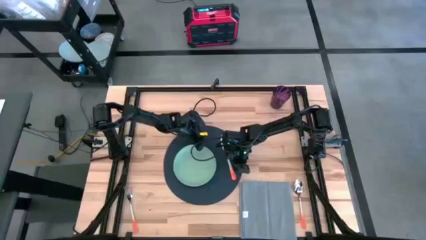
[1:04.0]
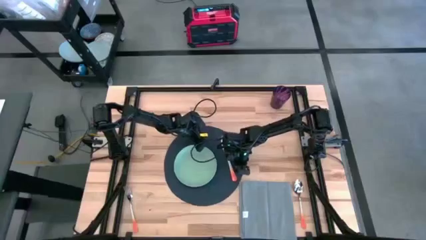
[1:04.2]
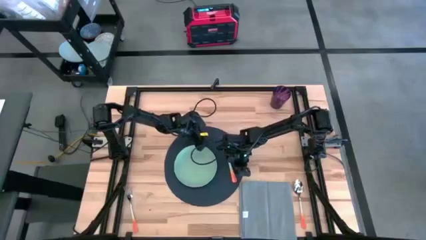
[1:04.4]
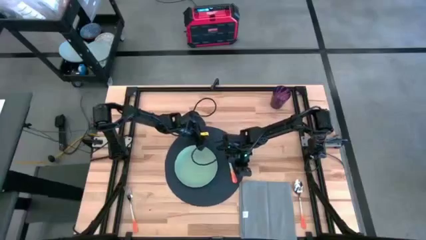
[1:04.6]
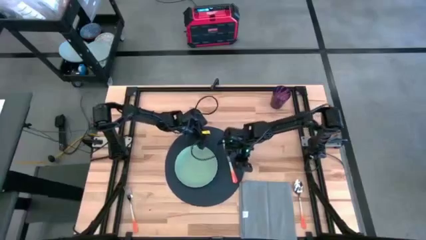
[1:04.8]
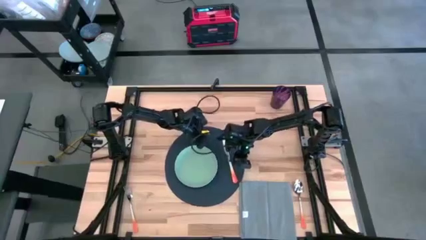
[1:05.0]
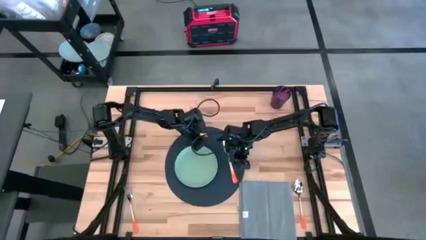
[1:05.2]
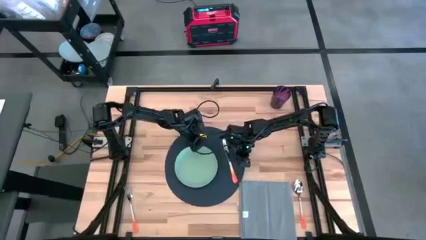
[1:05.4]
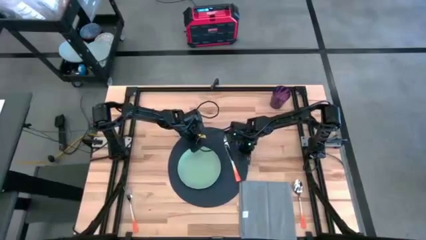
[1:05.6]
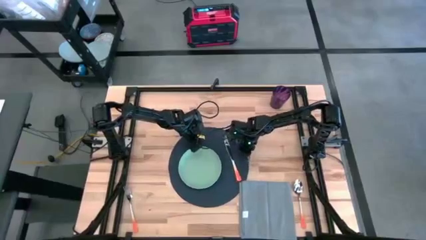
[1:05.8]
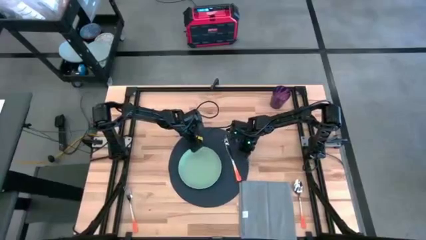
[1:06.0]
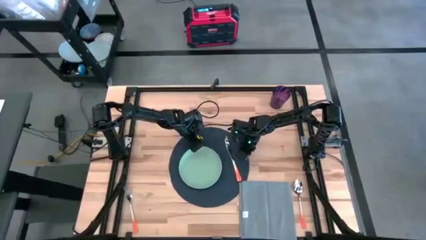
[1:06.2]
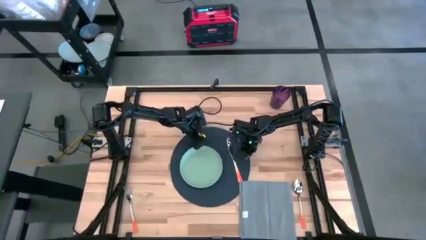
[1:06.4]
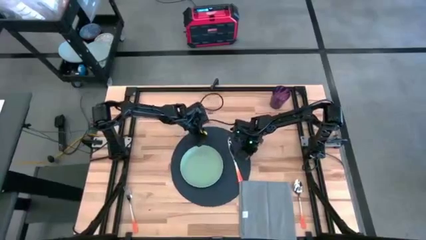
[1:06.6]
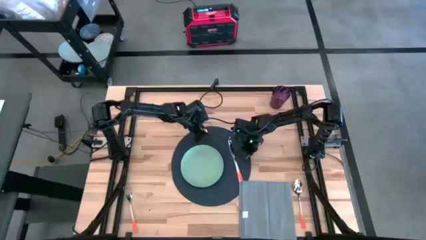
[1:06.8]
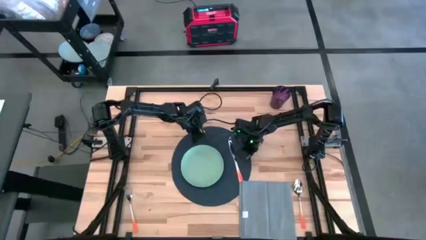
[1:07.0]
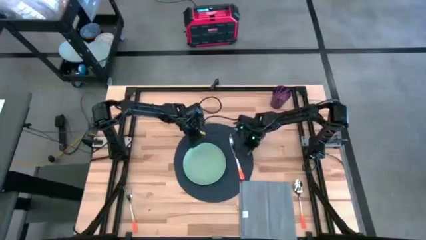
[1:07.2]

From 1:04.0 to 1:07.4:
Task: Set table place
Adjust the blue place mat on the table

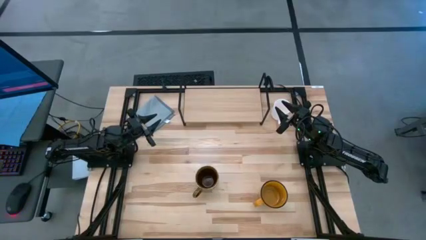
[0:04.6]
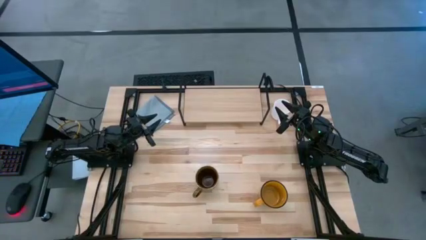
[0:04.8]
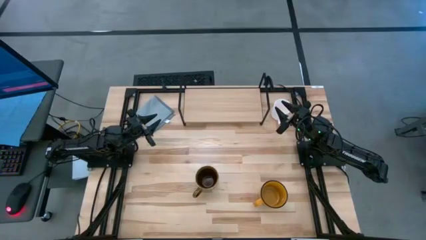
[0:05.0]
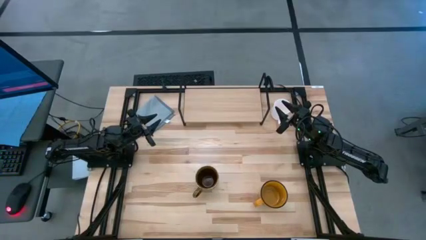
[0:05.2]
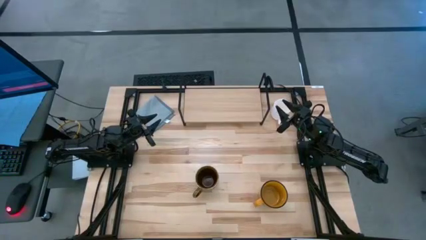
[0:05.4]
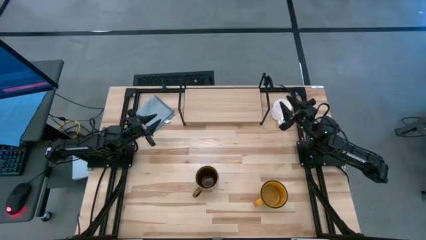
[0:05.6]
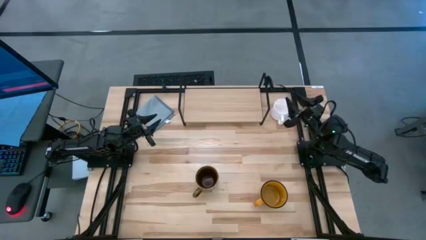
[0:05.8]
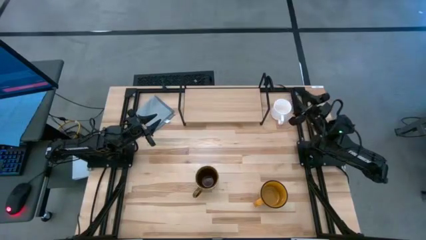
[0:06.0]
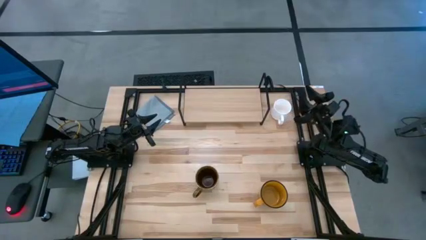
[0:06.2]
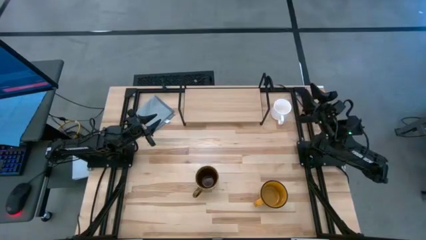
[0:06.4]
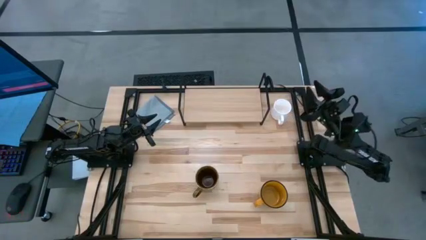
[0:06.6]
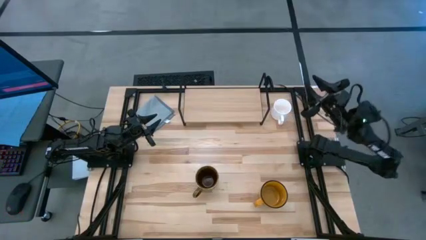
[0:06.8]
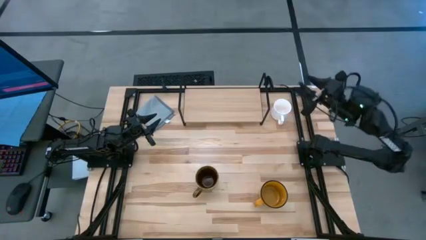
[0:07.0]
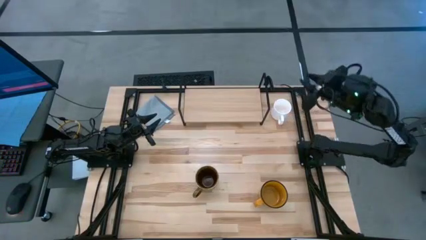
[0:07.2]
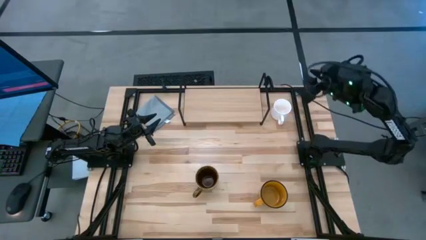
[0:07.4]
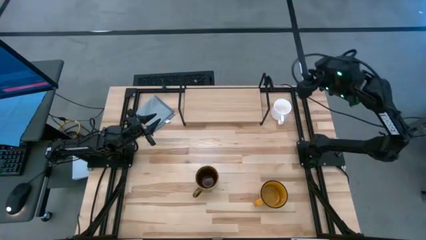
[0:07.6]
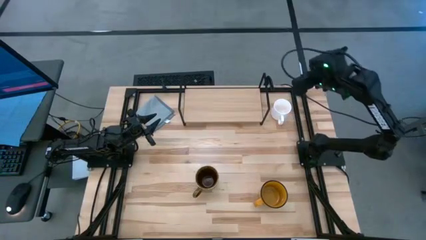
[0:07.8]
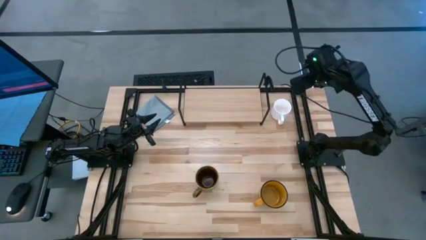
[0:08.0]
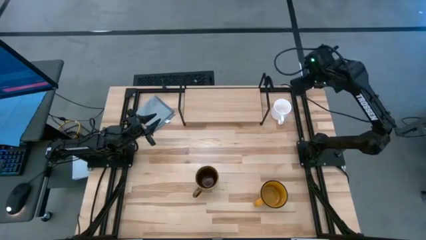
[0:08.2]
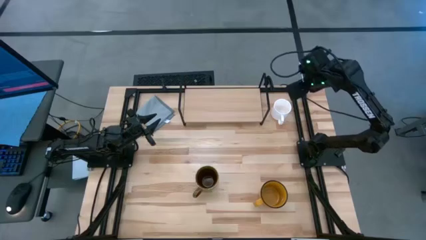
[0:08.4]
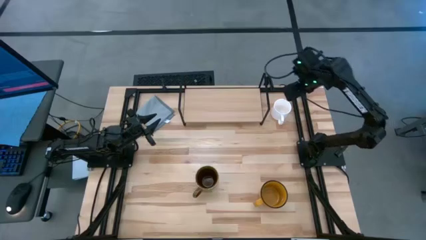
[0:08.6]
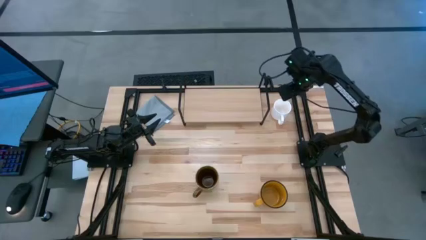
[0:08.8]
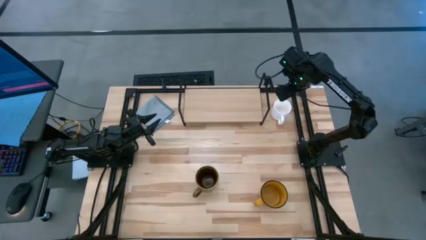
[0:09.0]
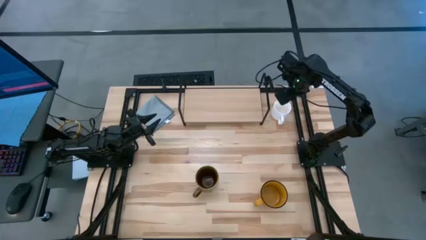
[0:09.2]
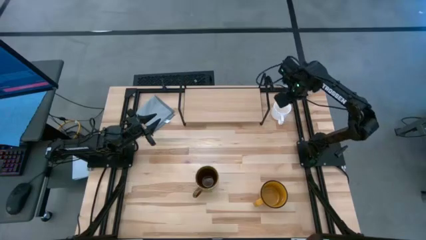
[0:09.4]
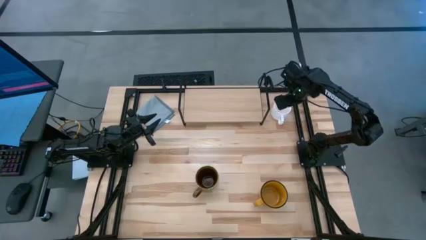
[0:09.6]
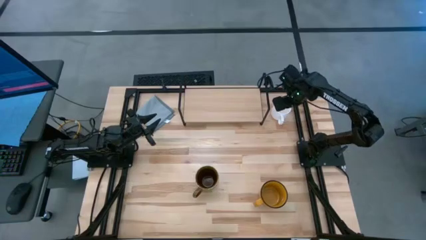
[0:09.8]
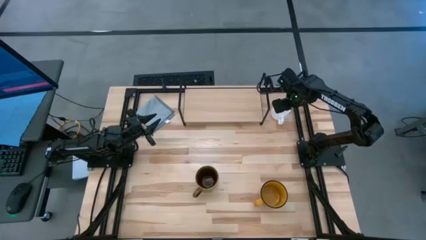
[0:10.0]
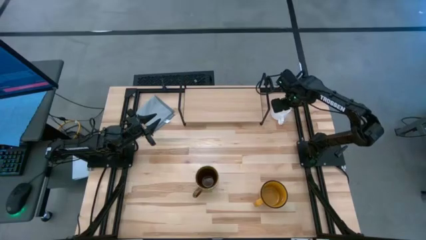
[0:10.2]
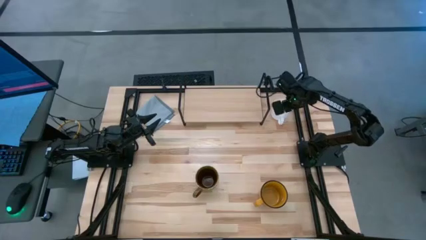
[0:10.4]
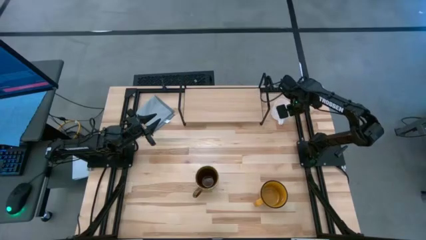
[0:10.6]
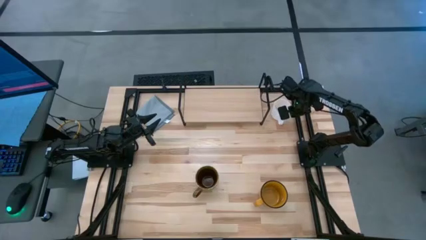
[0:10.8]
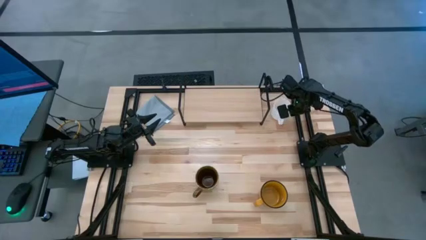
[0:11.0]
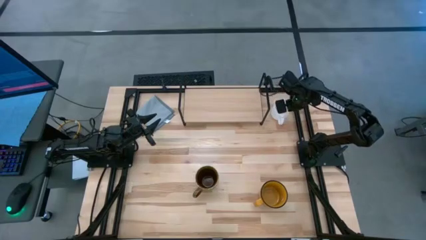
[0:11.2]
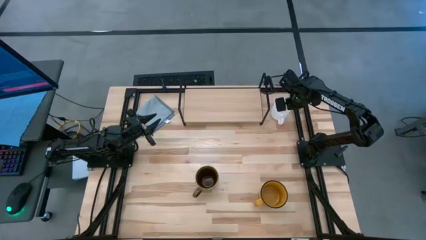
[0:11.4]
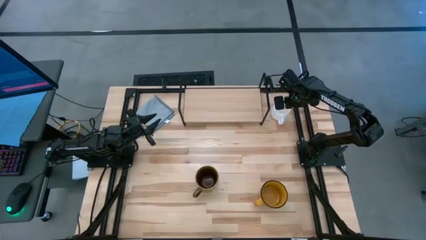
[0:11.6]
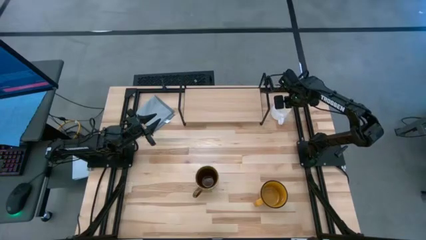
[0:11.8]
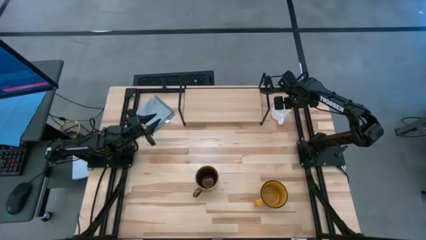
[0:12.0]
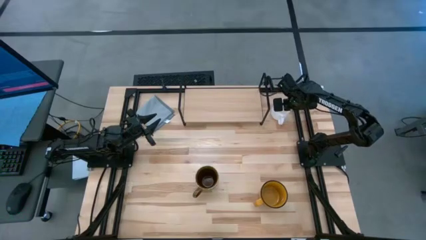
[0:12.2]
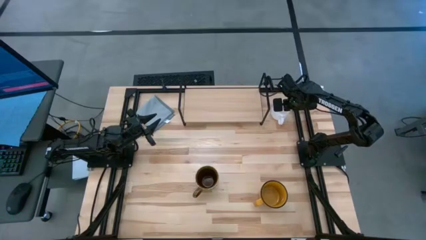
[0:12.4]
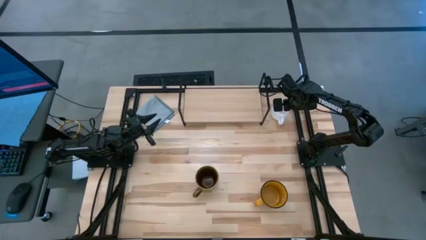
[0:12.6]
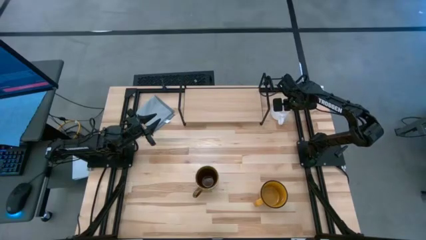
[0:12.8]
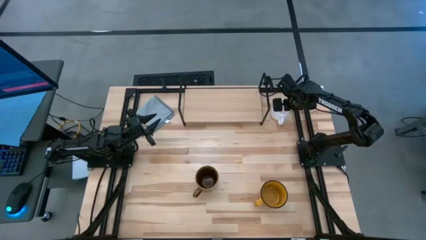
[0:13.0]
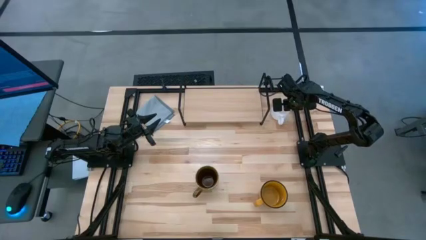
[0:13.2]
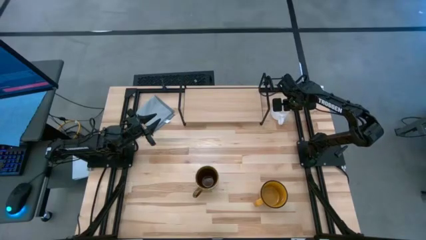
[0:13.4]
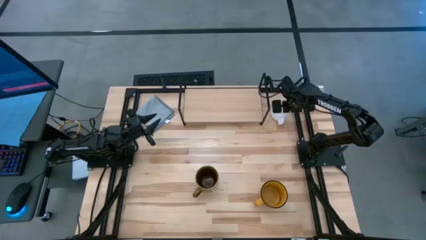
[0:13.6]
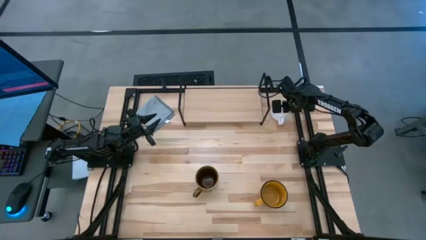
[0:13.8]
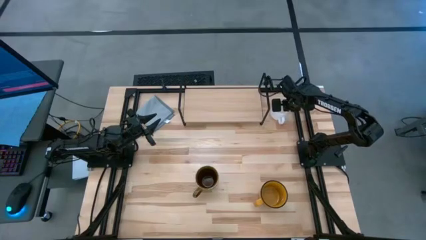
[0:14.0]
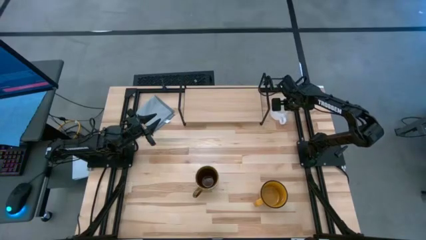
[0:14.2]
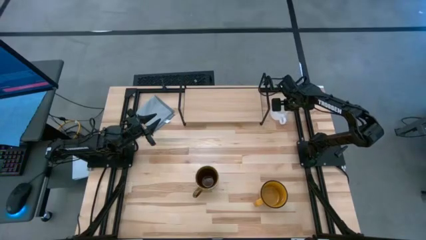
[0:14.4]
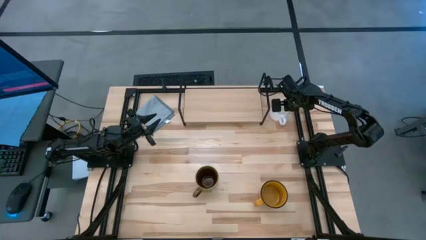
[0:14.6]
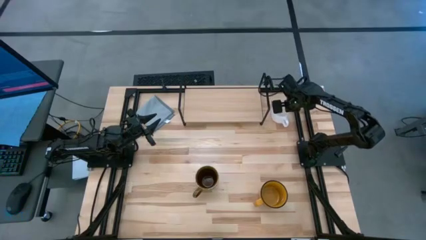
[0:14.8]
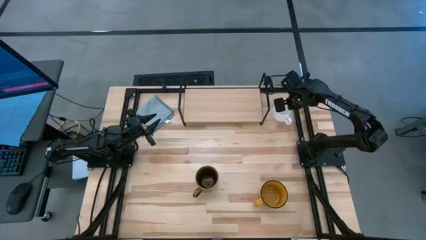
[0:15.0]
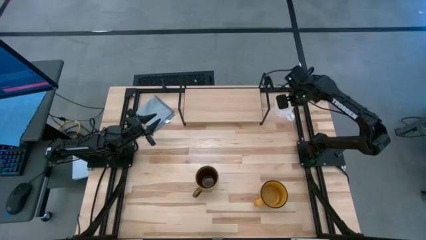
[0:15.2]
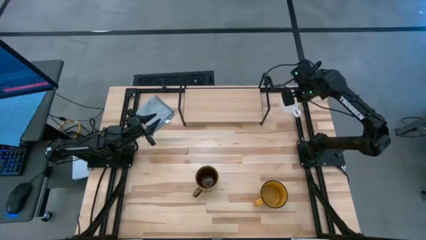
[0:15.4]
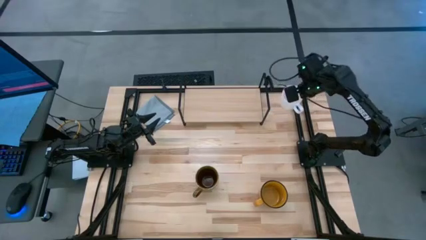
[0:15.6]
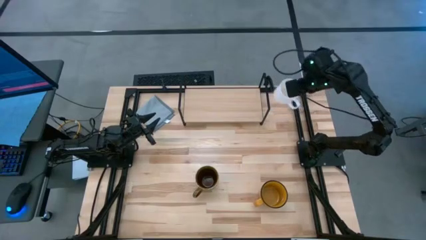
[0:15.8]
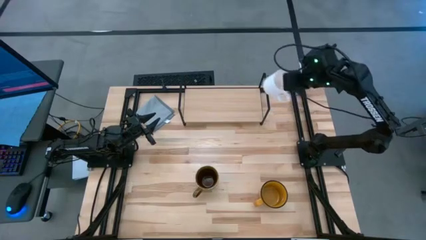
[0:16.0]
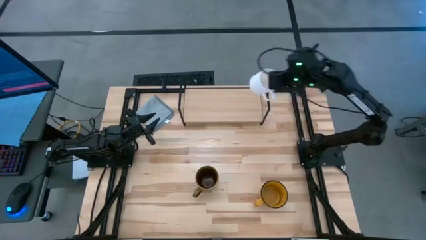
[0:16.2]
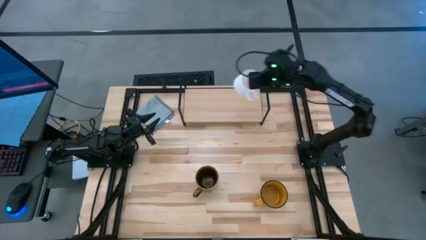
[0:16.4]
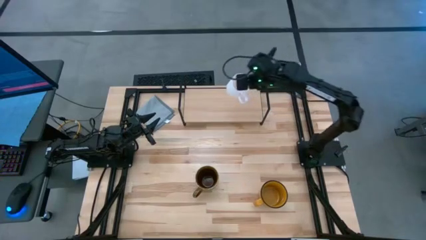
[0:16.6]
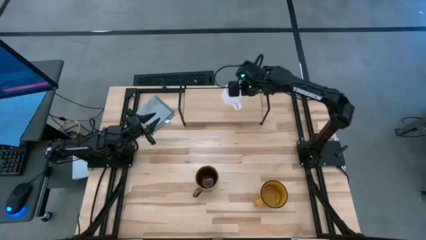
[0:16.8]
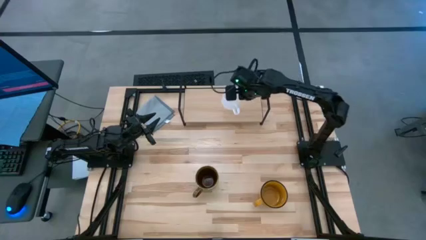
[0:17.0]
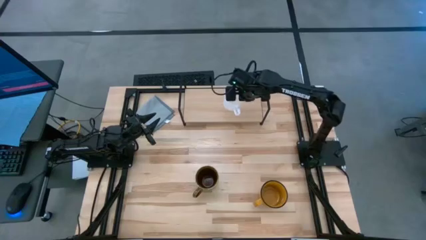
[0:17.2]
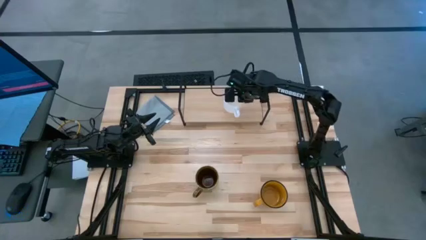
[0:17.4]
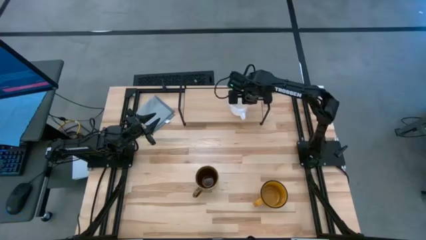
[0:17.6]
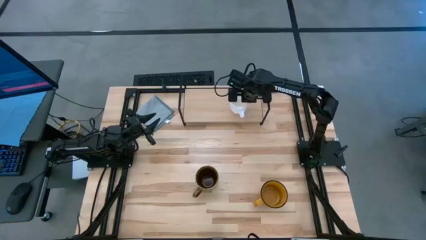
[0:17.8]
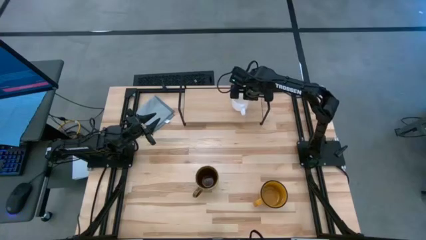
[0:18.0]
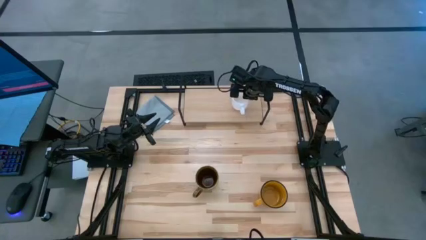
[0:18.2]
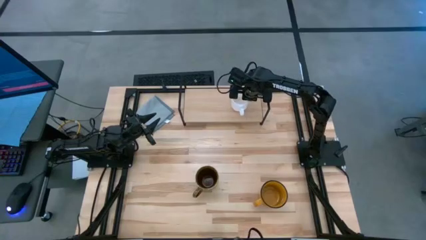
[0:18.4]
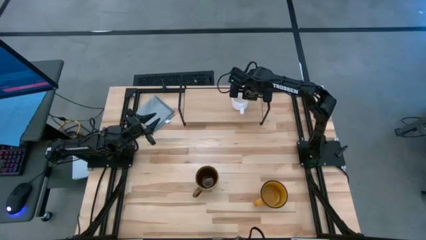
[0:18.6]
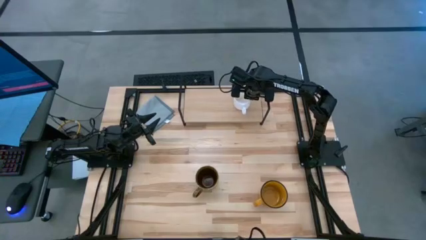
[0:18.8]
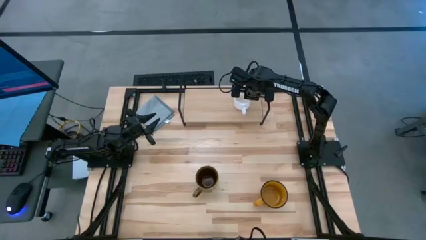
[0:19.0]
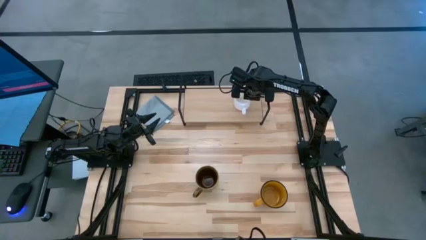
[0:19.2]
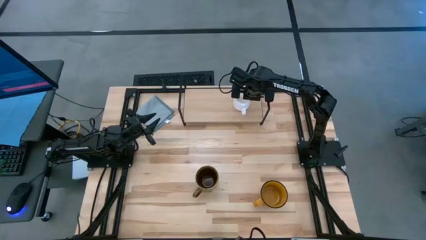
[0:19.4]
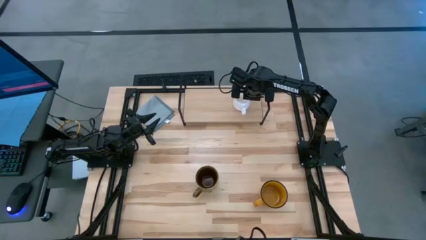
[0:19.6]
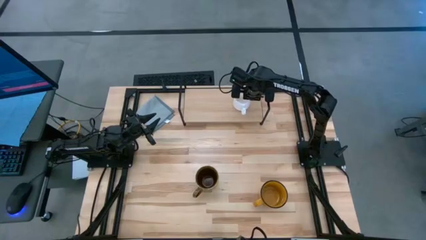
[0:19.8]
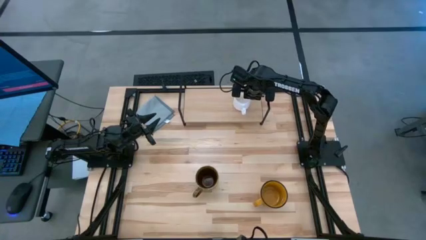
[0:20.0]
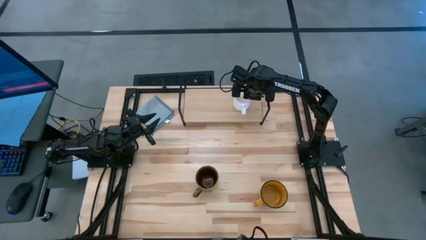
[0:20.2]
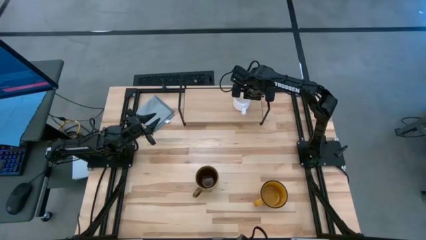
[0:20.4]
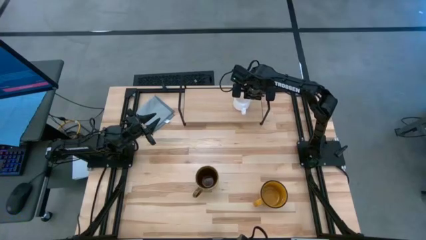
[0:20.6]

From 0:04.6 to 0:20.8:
Task: Stack small to large cups/mugs on shelf
Put the white mug on the shelf
